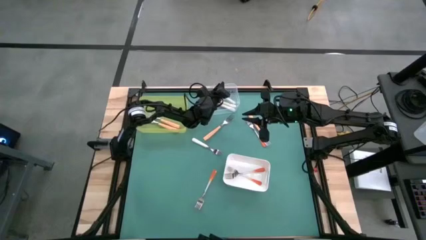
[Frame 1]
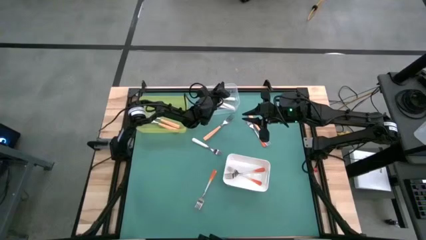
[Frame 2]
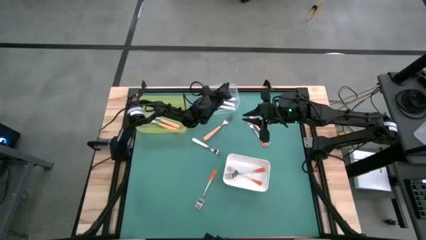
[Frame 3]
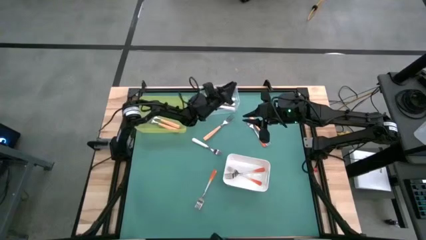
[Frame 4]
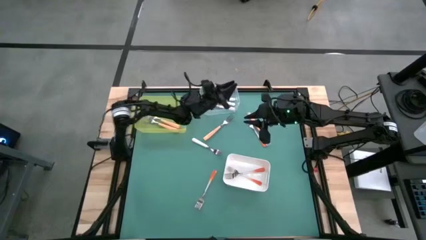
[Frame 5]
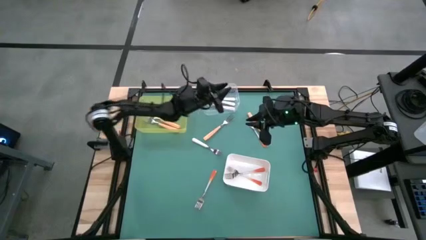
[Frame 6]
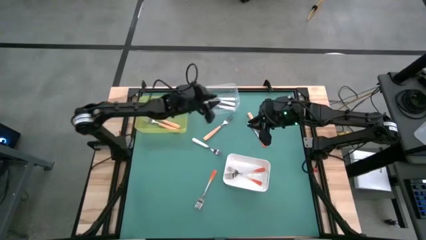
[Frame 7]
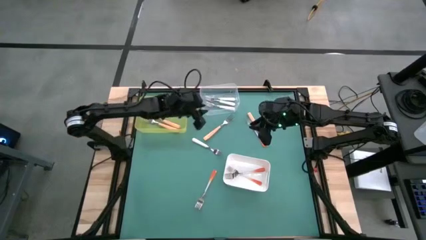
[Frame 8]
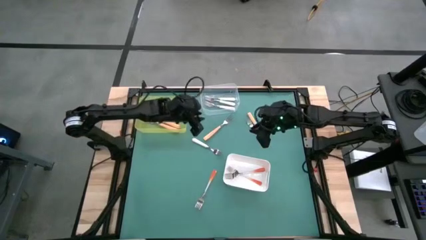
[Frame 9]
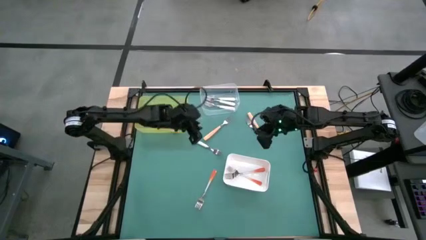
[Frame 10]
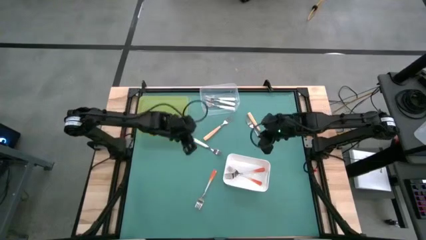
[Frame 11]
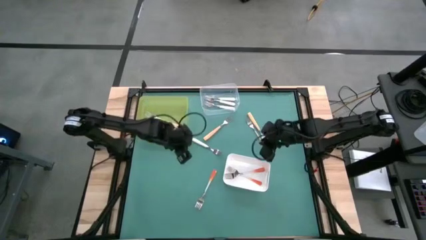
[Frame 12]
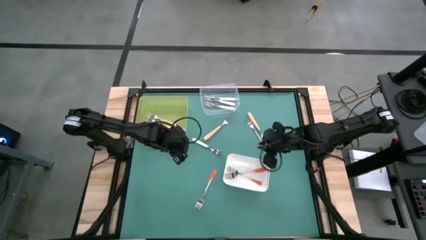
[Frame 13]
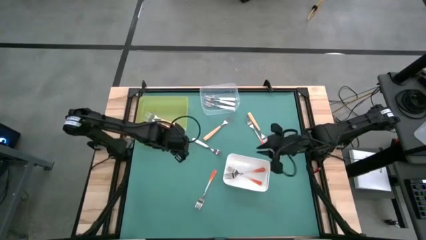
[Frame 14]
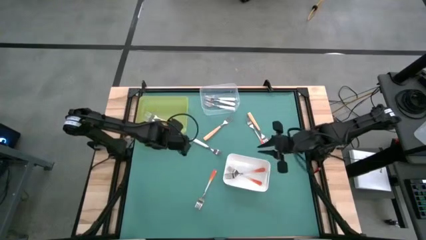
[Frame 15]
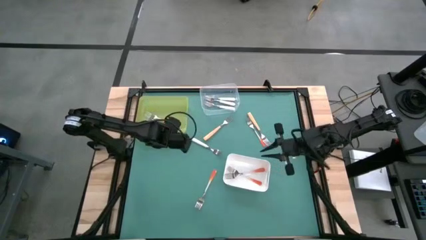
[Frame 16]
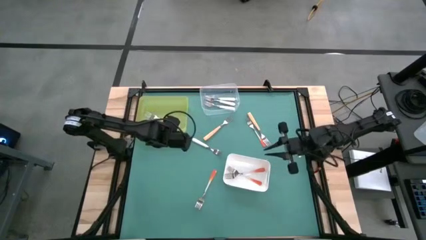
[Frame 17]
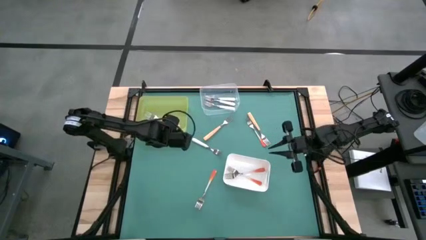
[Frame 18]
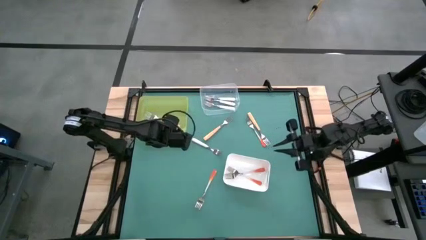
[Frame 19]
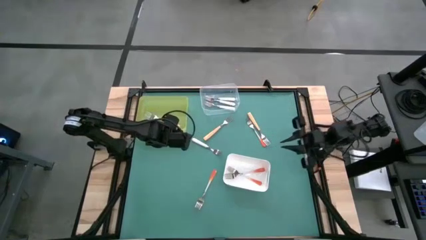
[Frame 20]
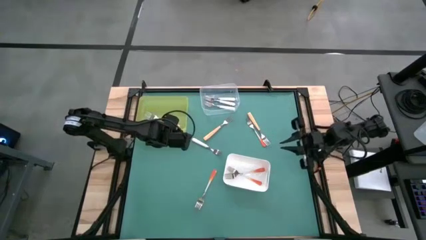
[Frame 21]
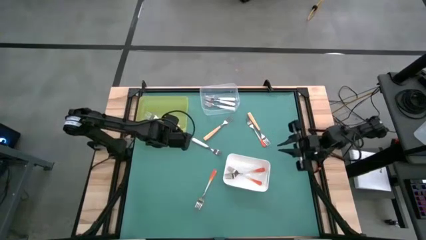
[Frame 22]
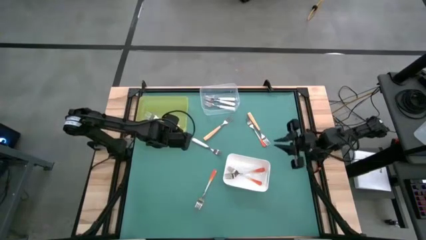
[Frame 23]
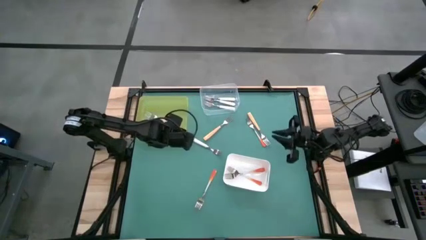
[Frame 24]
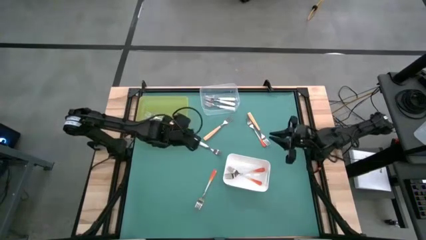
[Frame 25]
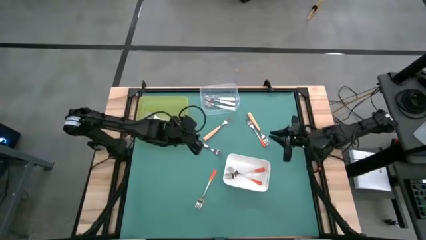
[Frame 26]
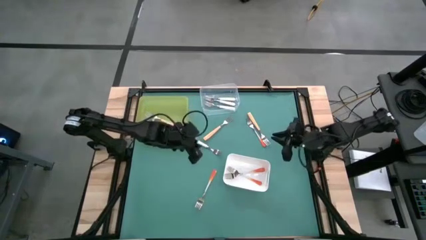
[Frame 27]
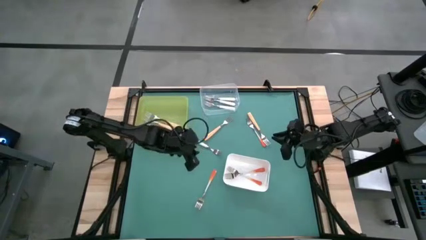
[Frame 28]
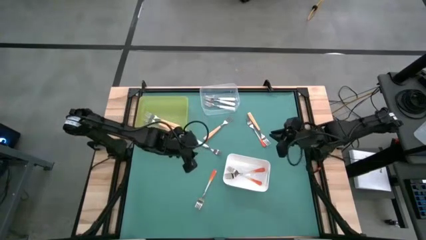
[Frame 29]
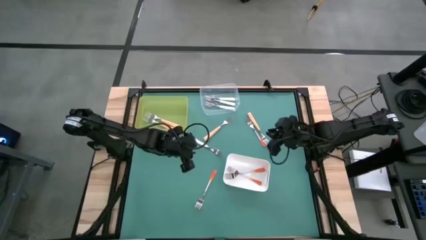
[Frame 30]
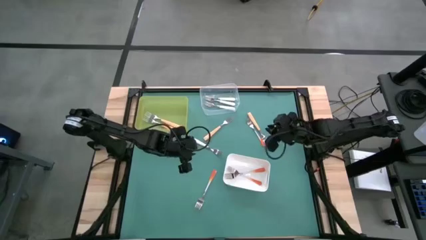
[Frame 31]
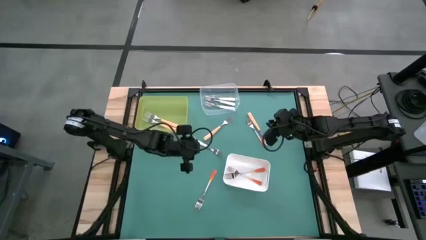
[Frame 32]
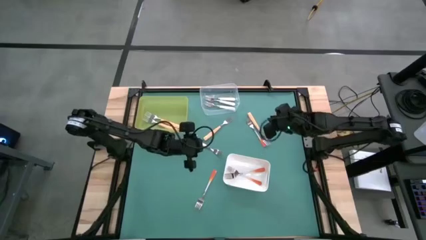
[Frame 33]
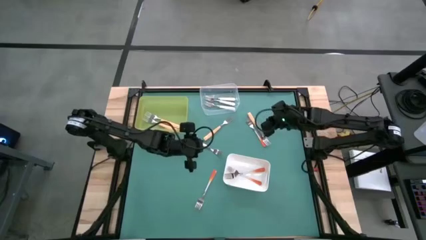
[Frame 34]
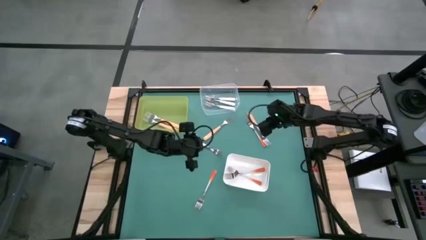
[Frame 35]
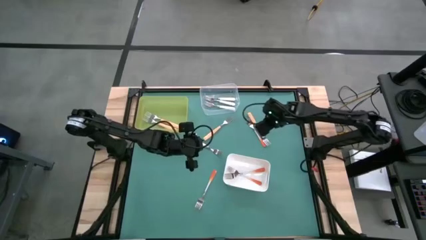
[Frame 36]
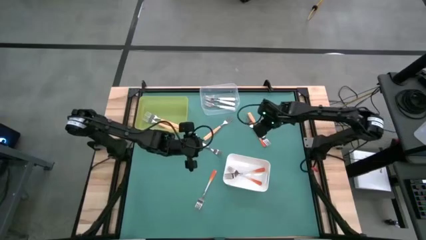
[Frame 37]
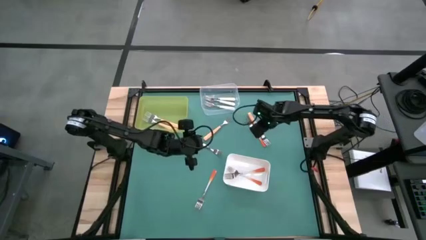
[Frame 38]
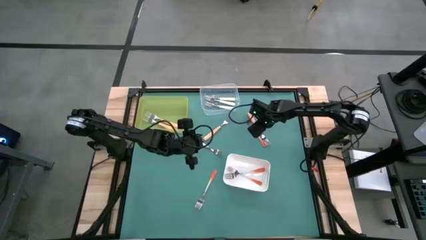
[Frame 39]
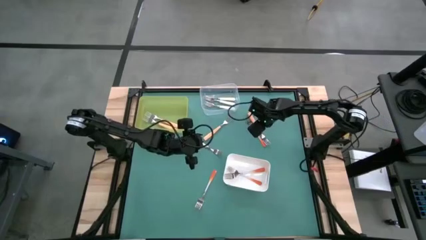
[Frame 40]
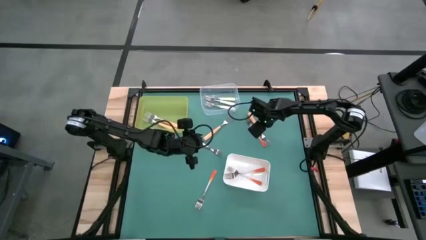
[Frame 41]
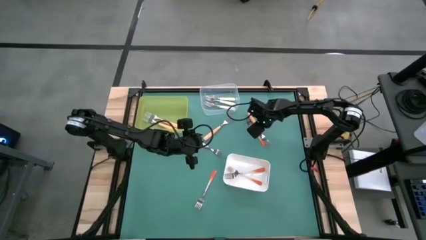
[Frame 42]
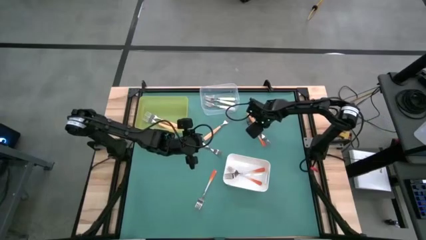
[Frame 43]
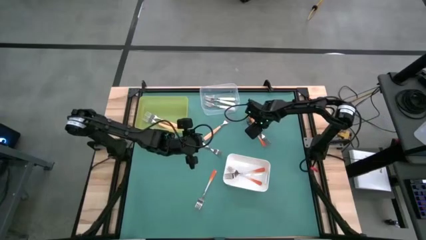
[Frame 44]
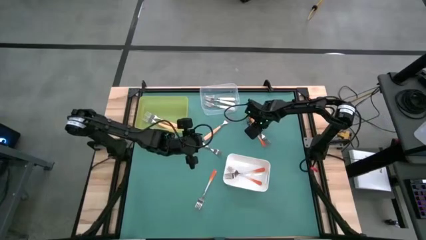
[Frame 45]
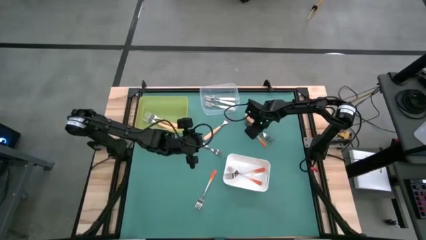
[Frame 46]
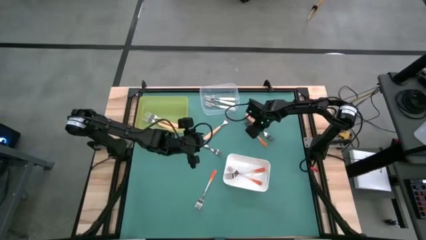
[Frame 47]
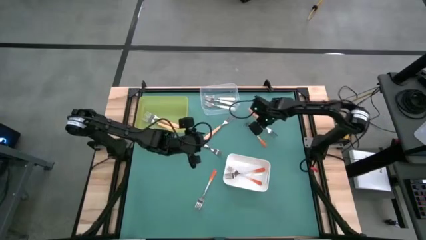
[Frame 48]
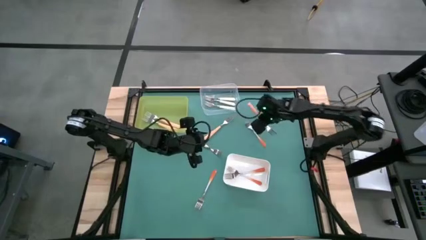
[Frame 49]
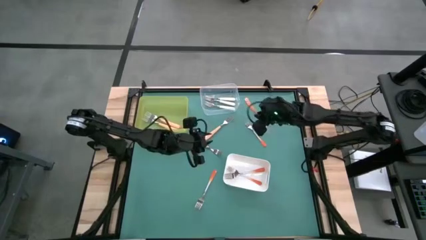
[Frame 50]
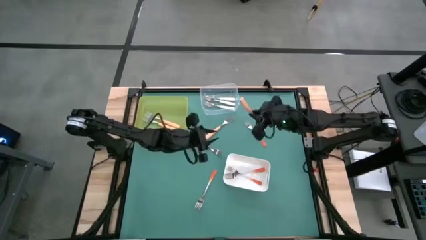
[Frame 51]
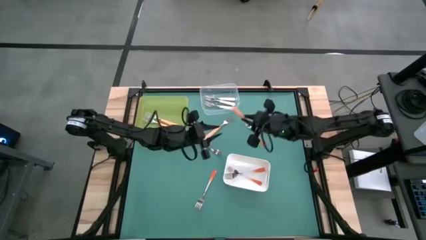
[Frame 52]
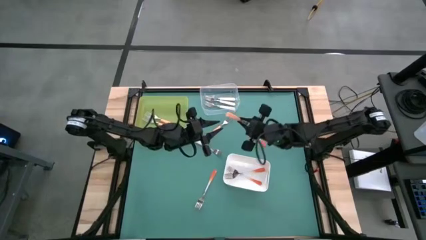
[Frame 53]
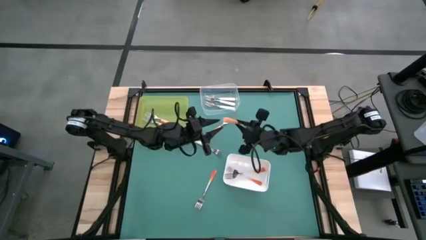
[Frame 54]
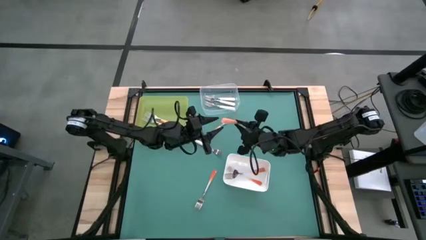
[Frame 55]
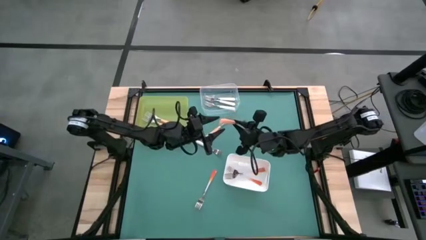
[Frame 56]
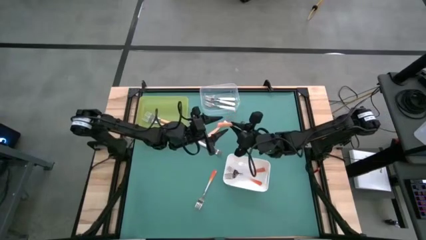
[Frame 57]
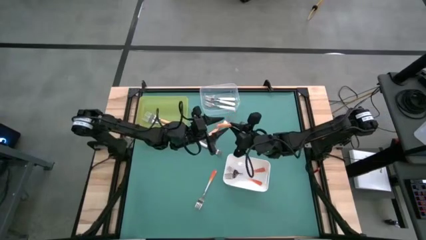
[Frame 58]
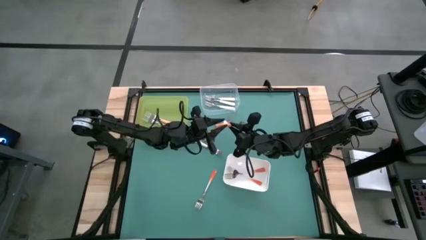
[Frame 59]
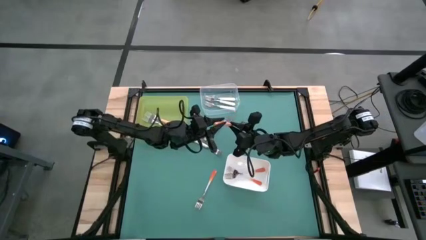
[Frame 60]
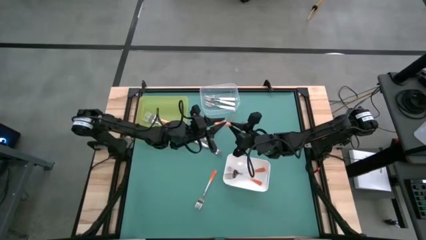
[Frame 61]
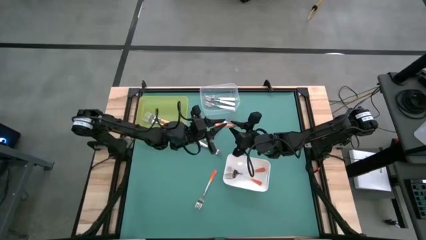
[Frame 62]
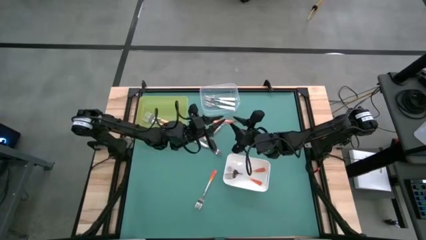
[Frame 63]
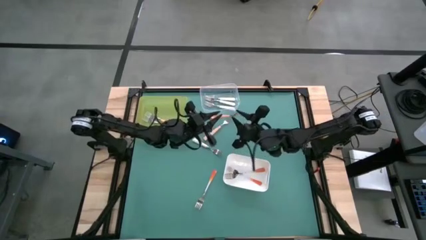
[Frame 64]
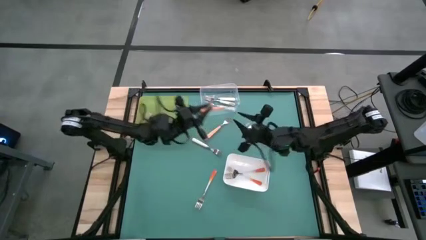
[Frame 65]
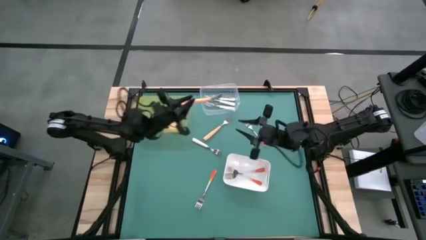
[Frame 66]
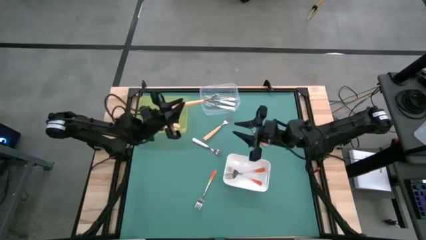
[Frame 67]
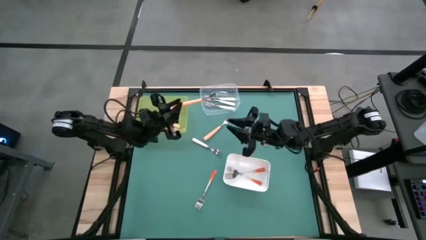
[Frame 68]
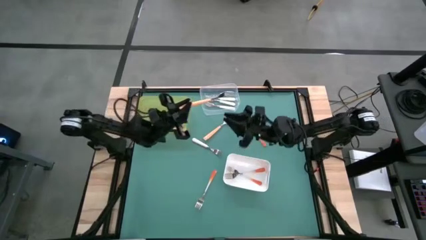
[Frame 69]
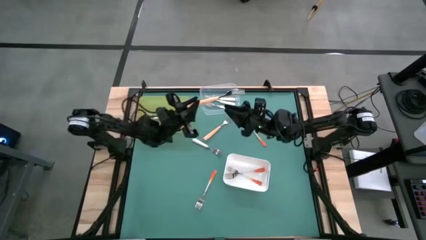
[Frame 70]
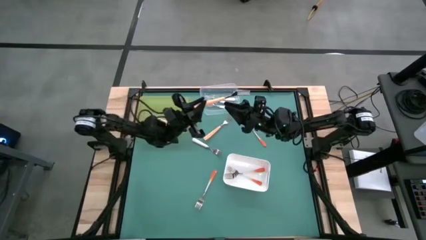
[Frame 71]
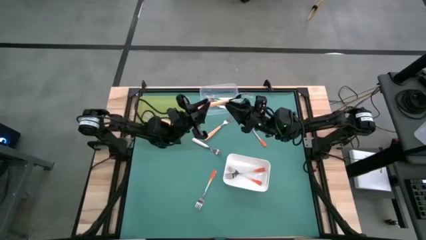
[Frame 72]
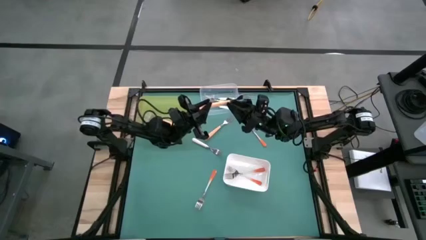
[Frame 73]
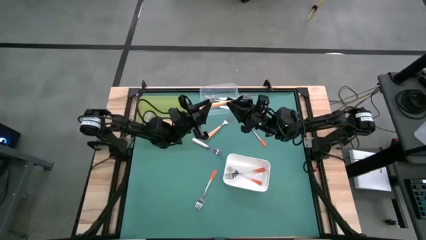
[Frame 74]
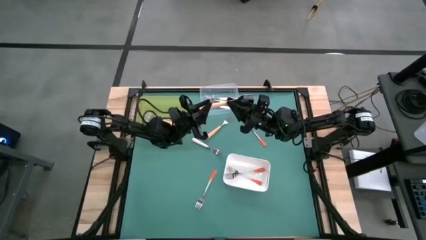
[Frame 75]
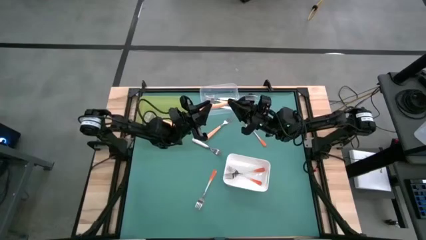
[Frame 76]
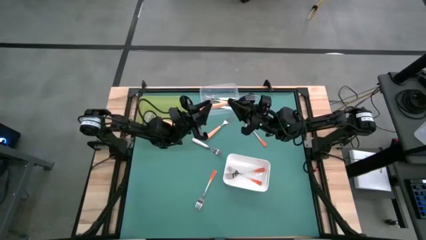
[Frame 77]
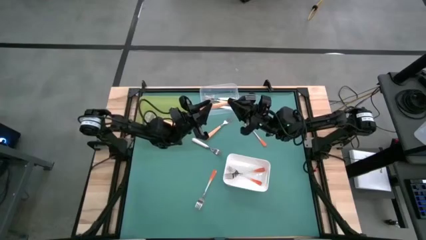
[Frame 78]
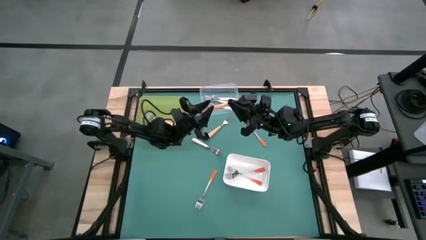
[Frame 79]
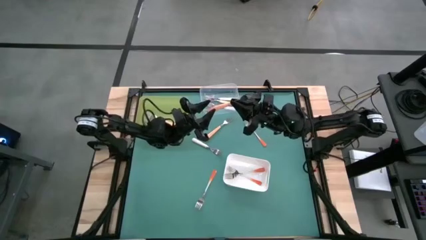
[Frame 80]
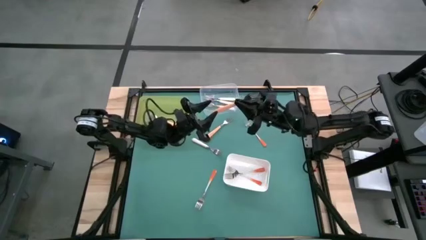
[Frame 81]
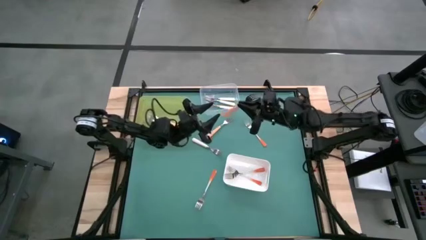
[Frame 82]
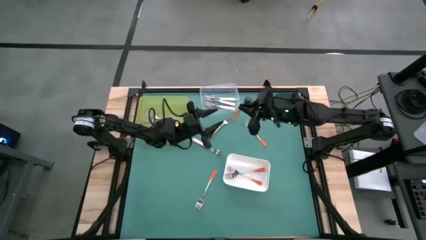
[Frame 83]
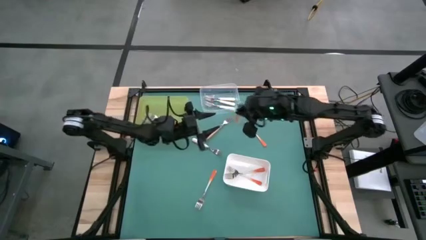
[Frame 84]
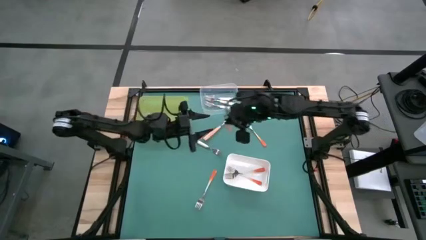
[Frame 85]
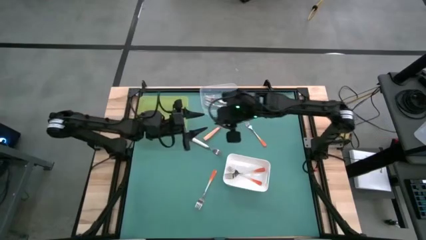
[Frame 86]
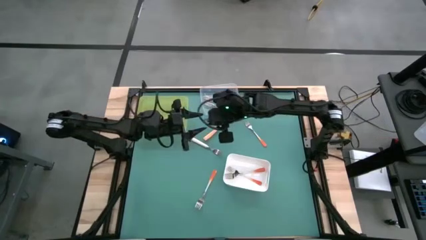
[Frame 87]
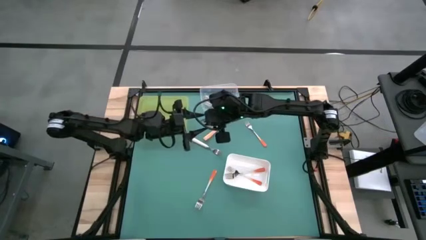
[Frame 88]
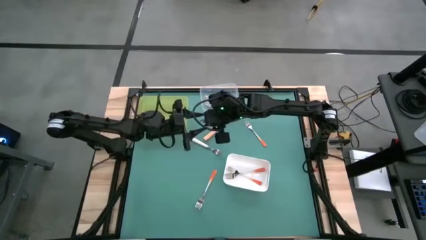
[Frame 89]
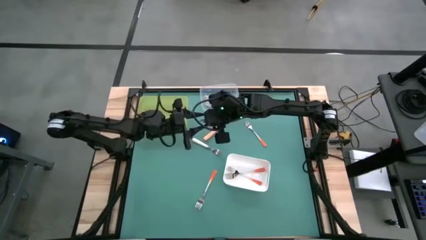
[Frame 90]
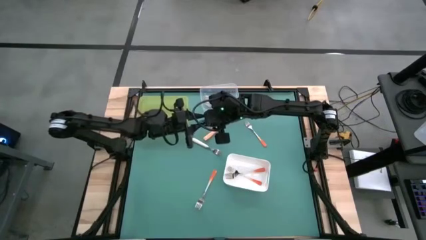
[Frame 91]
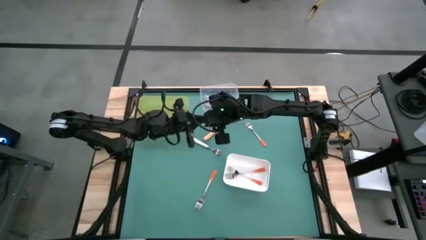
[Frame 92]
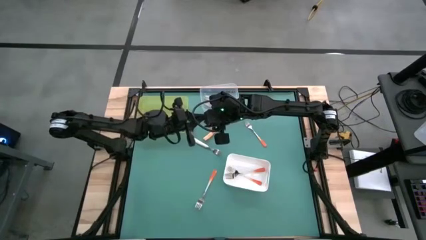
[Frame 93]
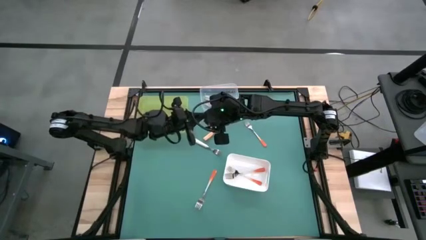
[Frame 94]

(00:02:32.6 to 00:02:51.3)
Task: Sort silverware by color (type)
Put the light orange into the yellow bin
